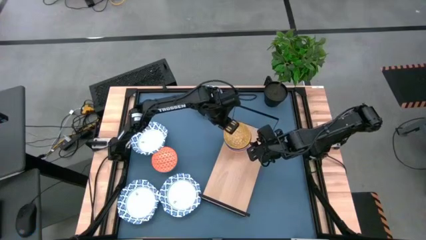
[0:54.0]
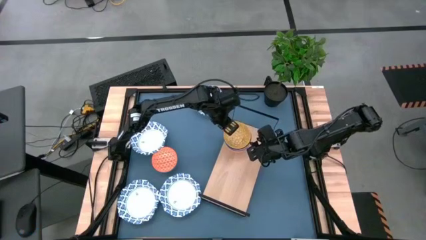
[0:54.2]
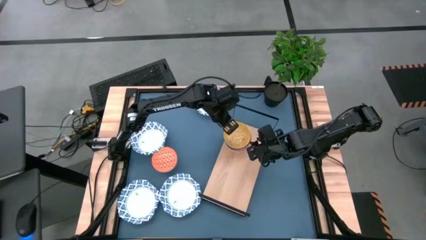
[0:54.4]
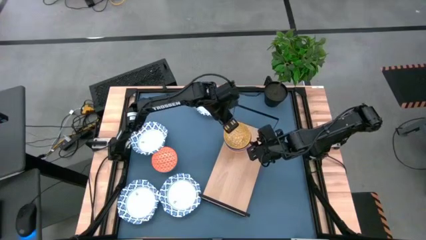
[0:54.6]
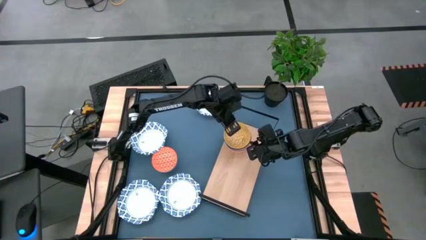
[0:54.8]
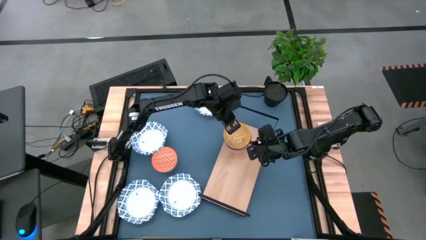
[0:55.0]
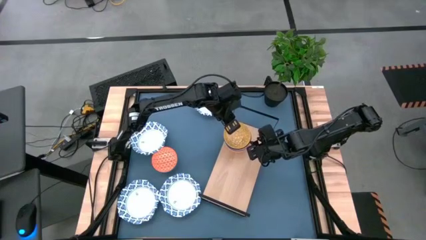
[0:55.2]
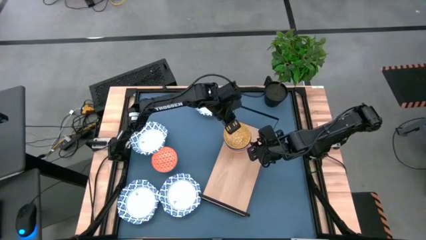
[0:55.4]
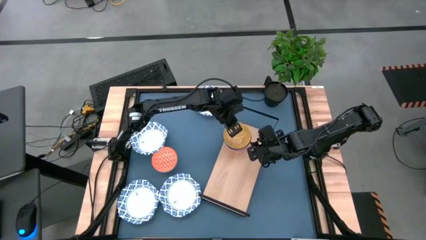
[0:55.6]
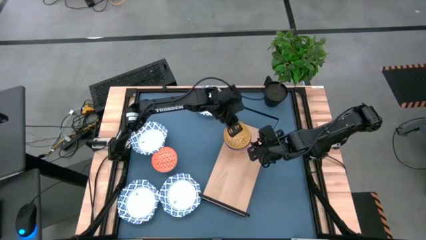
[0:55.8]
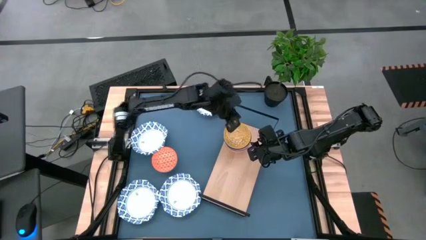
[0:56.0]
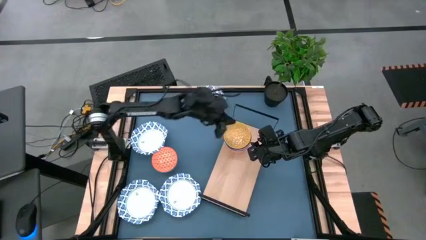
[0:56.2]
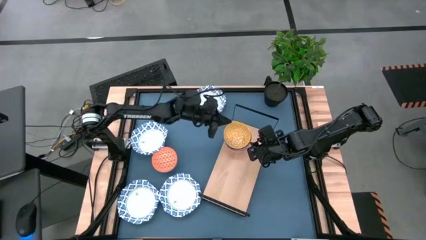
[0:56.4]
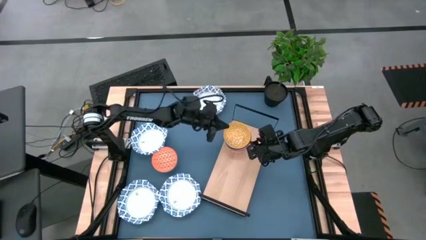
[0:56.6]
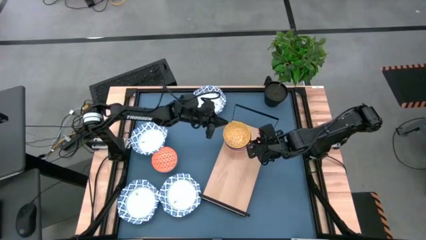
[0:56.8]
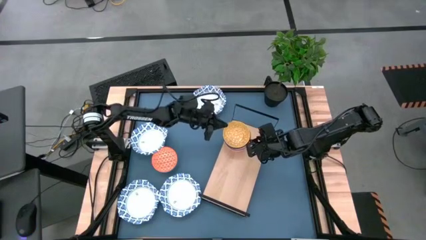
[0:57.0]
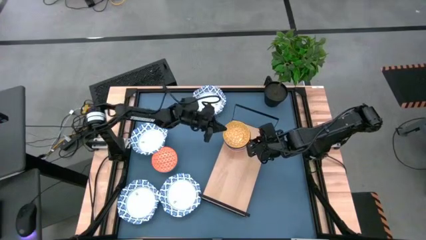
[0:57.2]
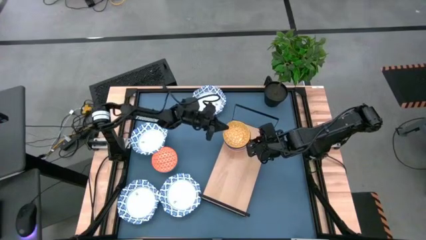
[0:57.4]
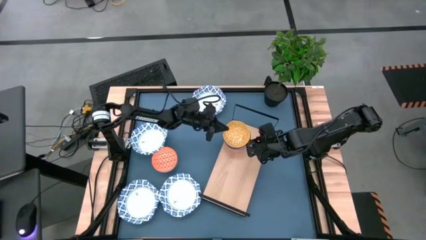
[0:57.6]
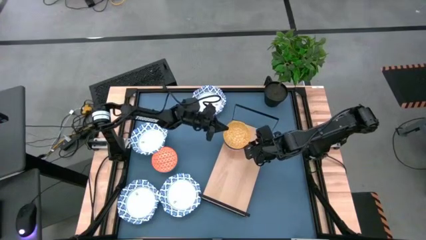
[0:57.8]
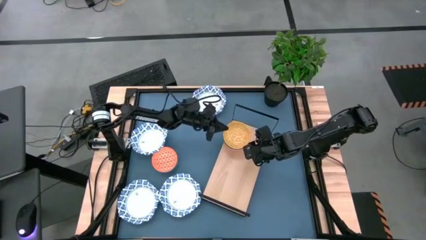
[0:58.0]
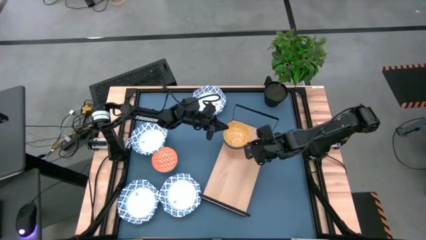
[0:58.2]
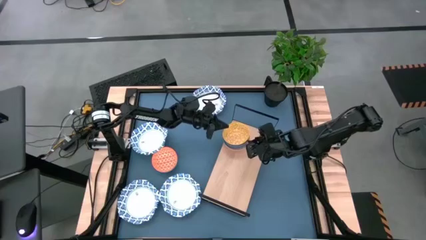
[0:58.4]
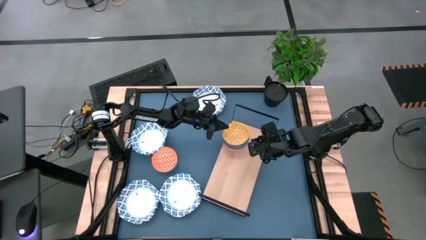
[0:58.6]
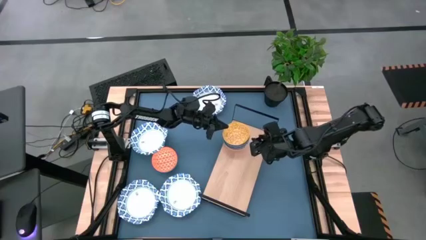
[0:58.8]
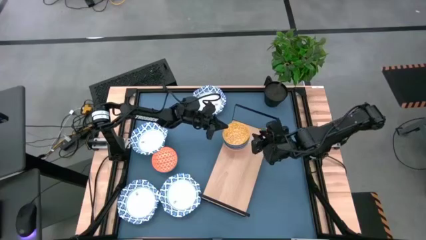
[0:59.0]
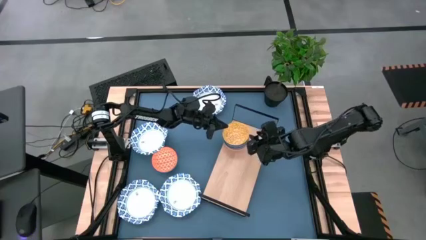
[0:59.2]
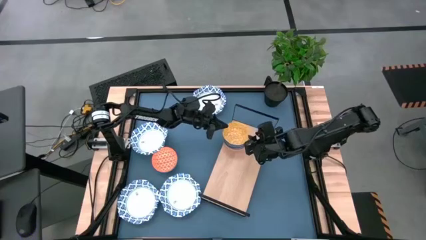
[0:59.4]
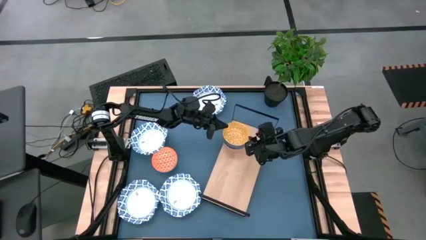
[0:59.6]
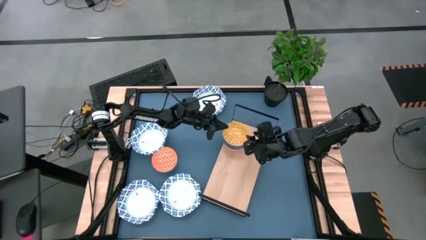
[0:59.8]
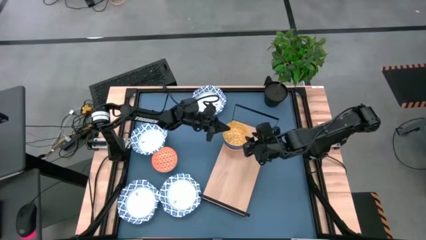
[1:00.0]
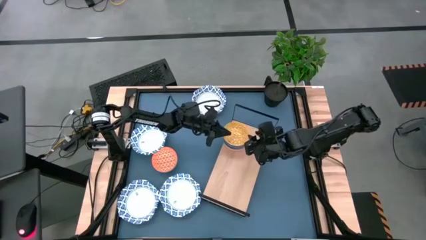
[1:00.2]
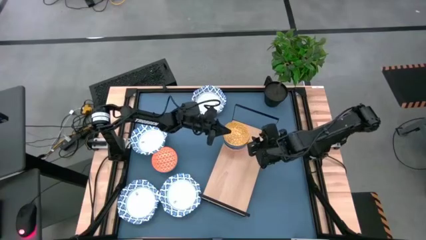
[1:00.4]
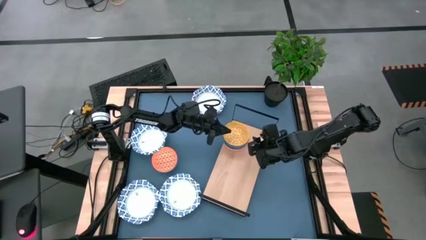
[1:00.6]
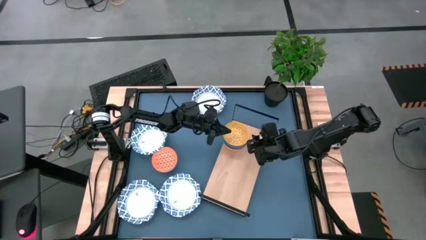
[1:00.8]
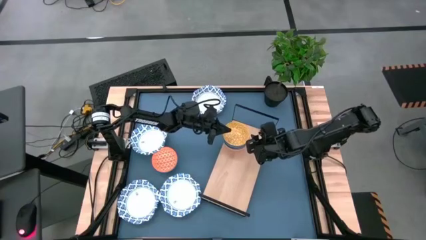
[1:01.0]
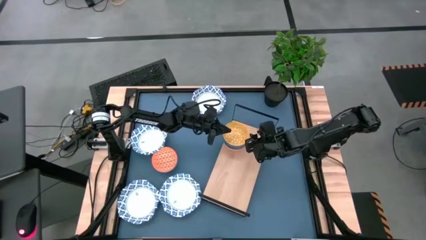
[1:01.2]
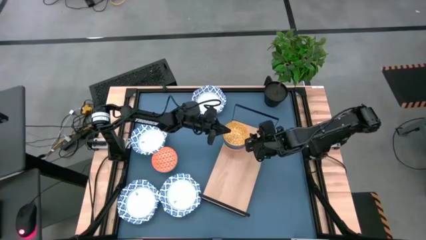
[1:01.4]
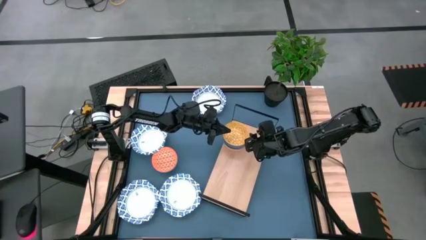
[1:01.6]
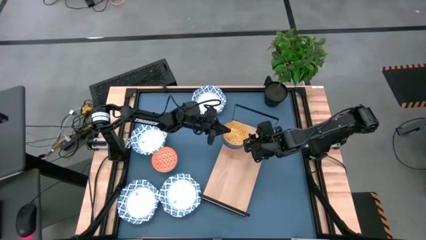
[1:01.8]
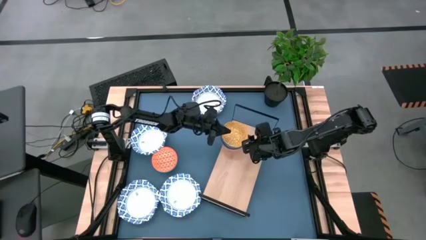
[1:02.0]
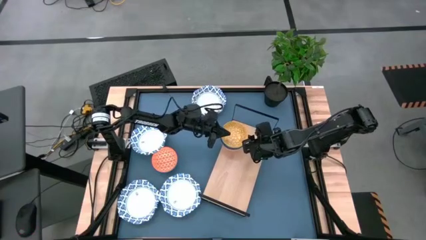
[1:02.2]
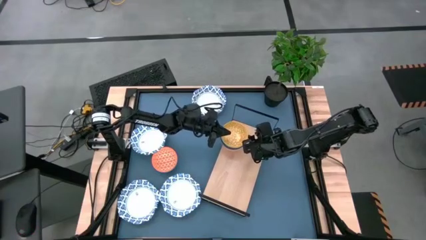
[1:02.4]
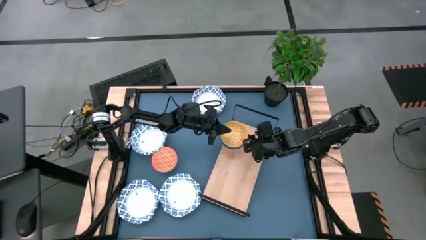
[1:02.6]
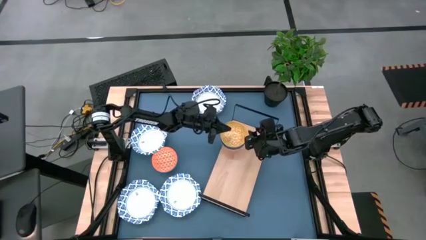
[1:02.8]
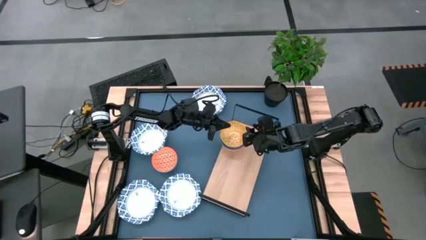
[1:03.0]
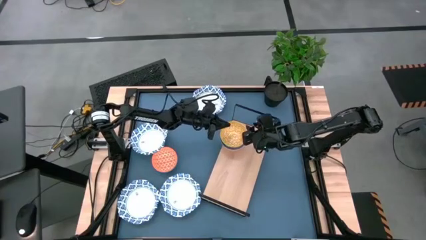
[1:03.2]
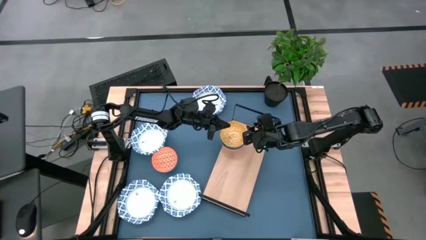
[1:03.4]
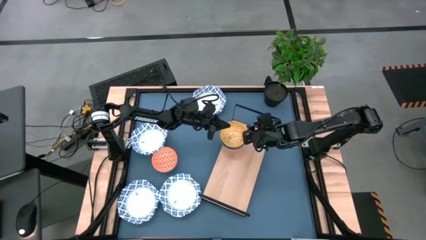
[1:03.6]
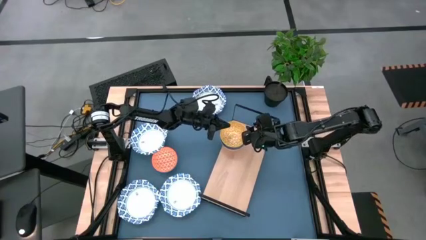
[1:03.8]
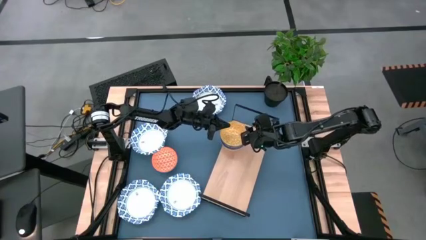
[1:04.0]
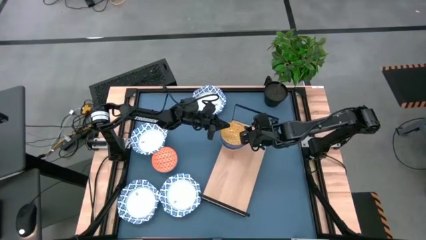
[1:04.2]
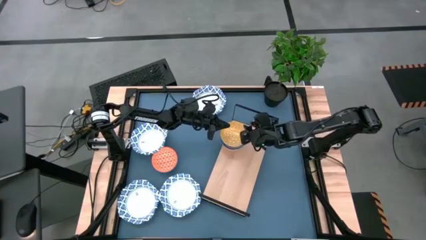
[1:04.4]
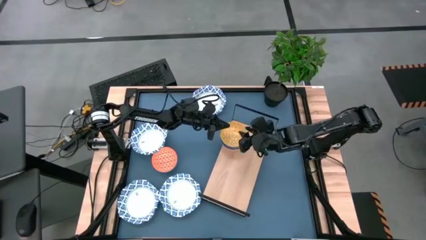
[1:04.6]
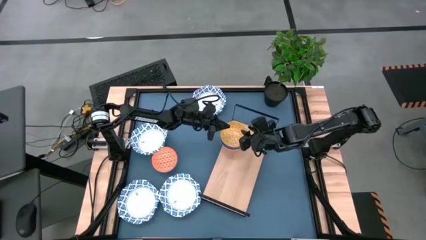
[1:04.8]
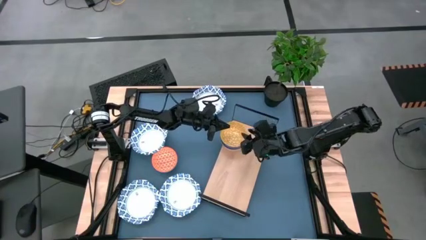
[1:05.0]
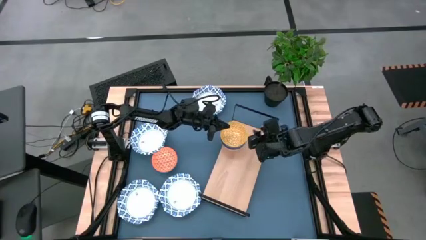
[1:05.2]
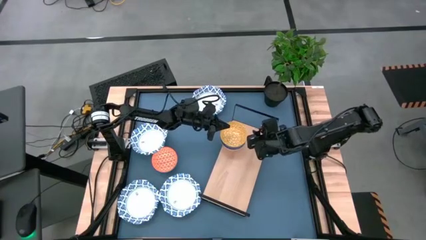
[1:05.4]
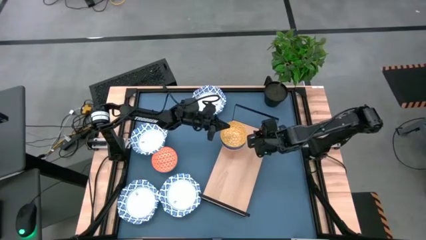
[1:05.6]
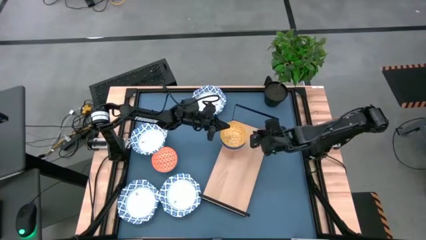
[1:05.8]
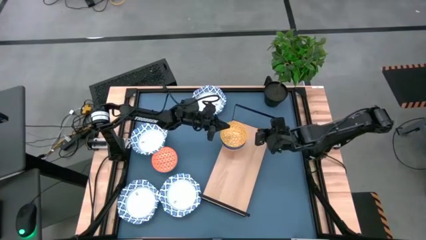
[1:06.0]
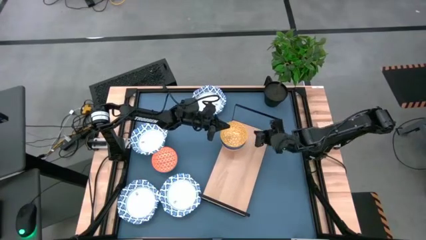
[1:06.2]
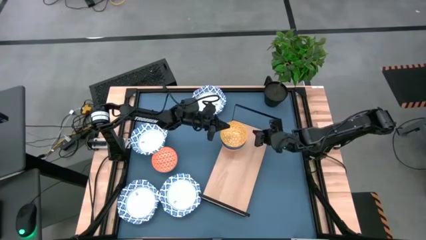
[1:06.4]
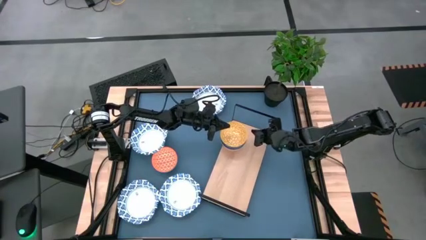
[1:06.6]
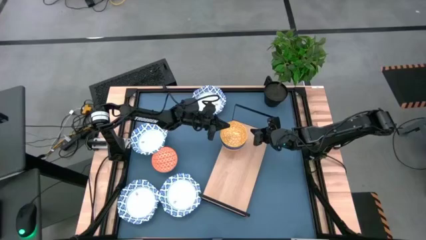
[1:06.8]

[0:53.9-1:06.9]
Task: Place and stack bowls onto a shelf
Adjust the stacked bowls on the shelf

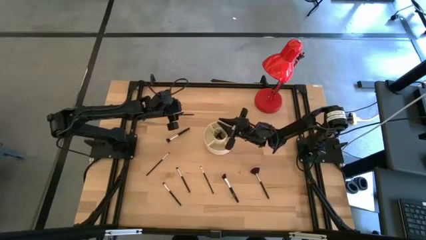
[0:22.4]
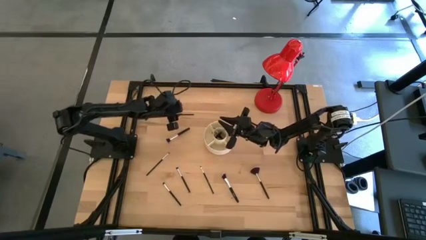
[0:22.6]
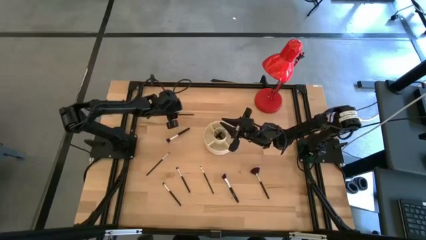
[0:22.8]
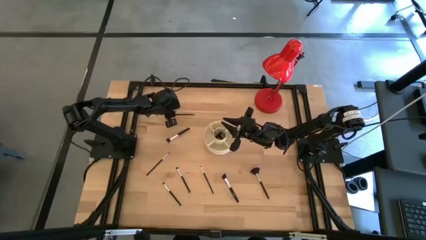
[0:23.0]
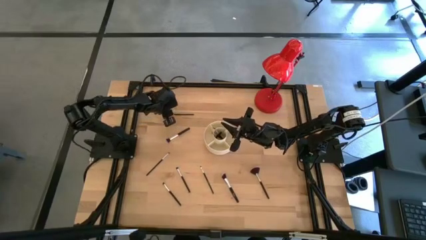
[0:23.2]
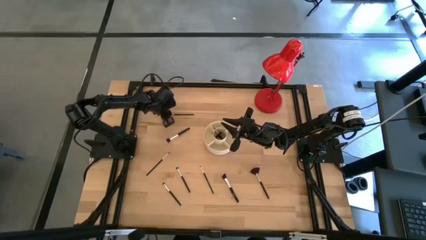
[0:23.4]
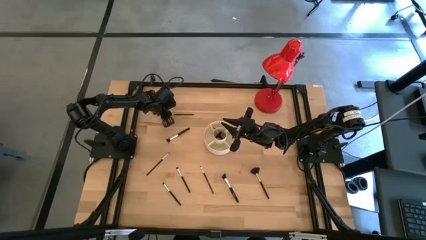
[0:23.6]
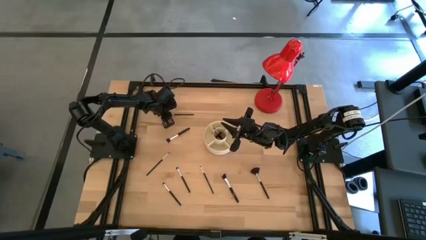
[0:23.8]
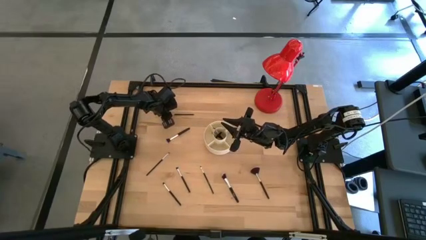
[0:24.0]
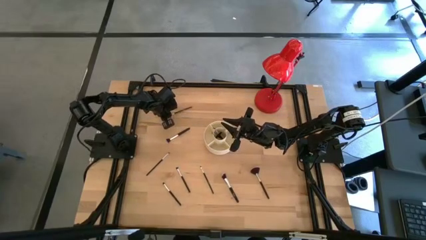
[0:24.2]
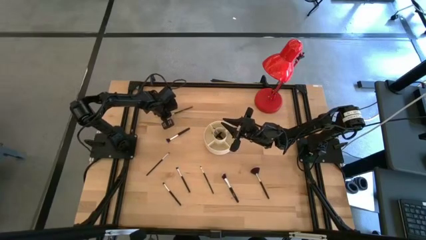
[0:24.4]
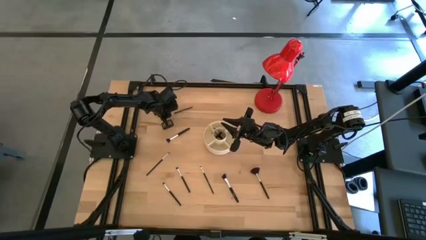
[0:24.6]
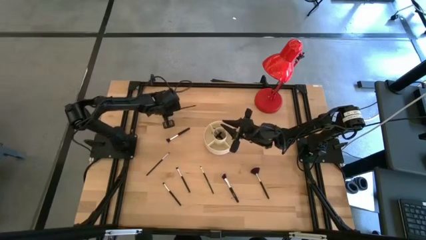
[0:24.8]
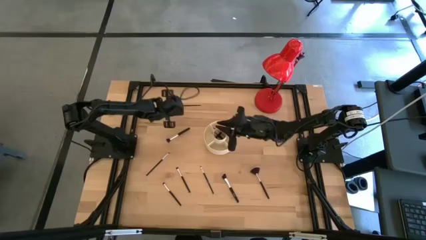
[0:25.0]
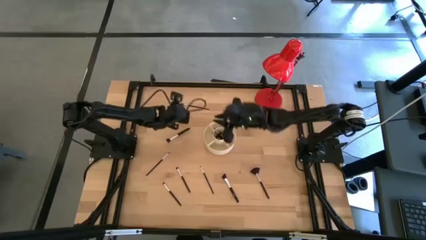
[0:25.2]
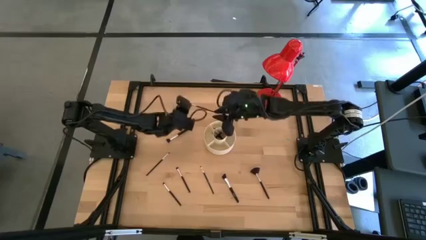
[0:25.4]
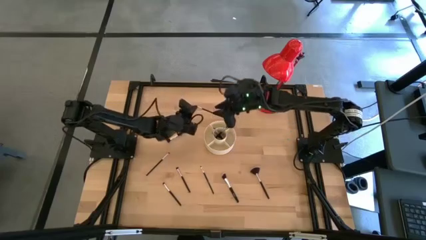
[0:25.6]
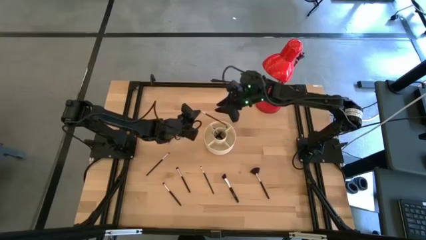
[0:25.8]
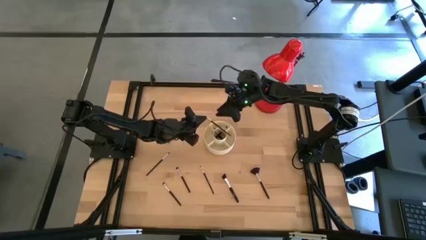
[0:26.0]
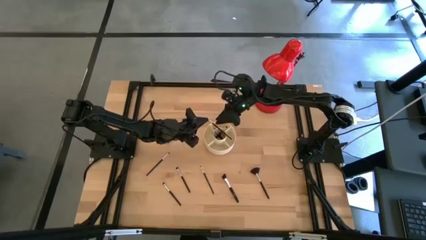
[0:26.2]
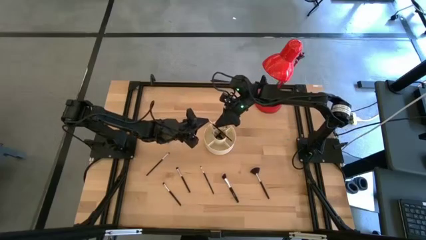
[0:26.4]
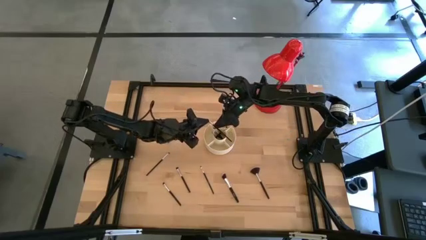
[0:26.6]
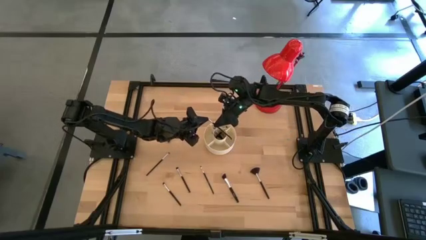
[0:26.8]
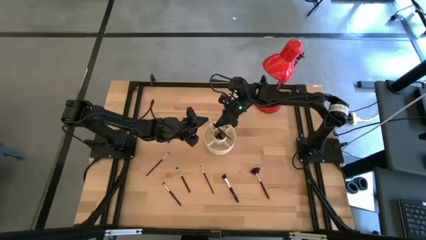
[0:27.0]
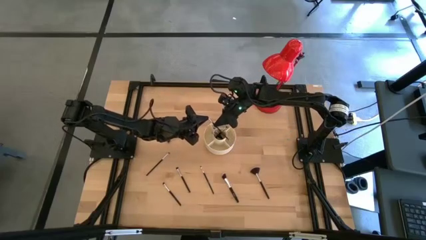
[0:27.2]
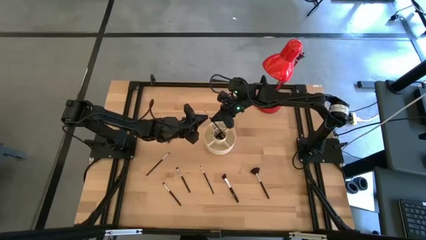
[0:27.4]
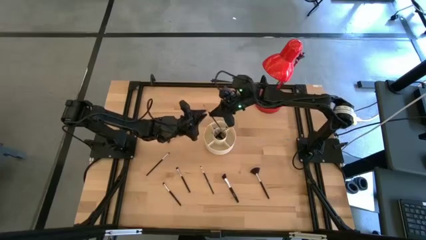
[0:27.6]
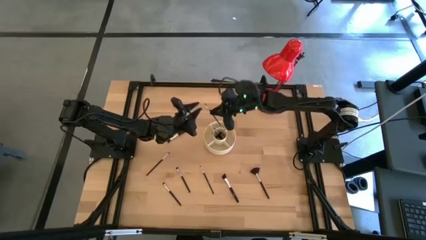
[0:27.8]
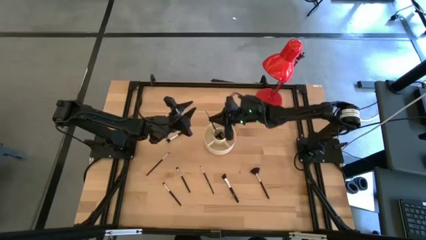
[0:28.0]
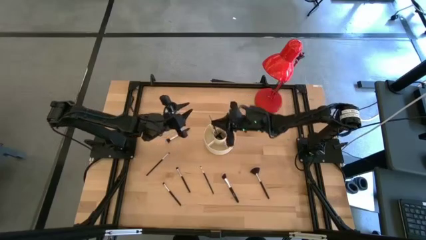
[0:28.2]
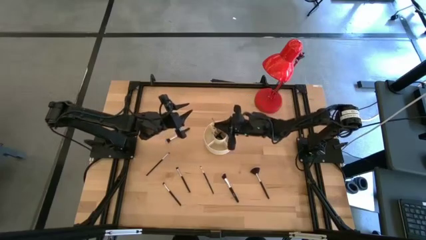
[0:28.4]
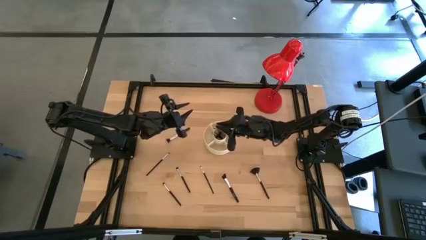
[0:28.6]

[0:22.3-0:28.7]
Task: Put items in baskets/containers
Put the eyeshadow brush into the brush organizer
